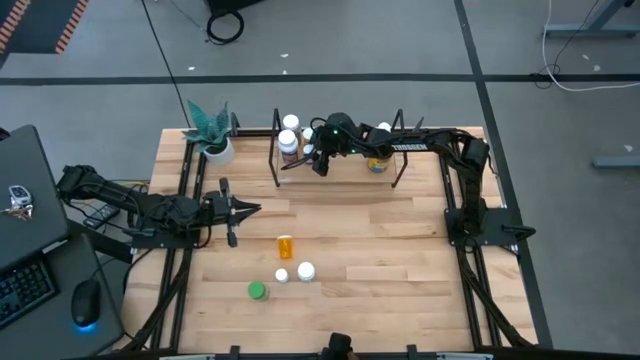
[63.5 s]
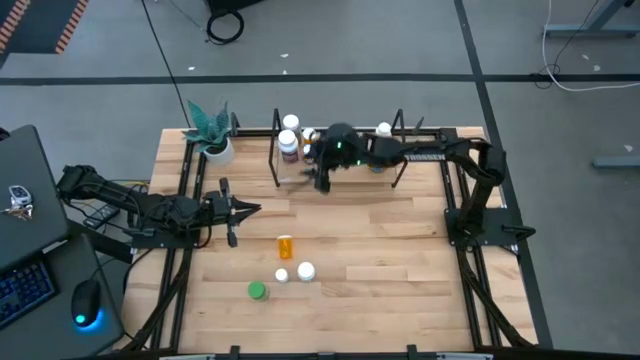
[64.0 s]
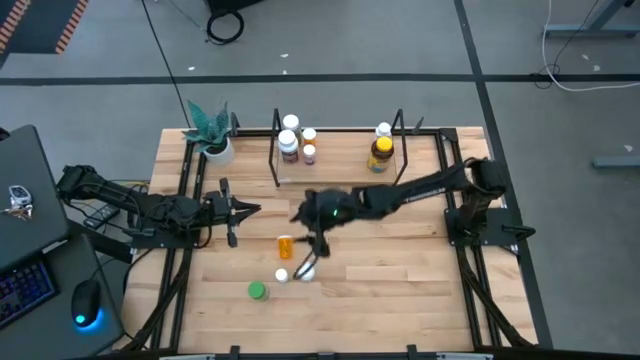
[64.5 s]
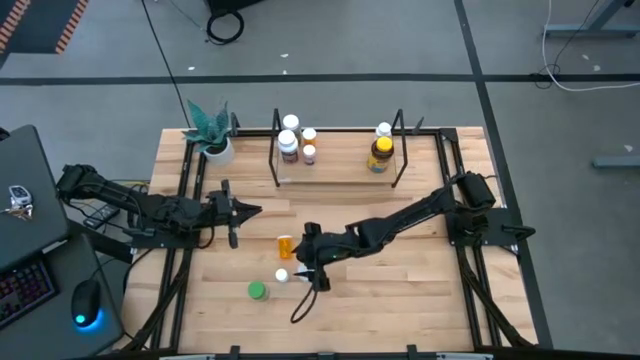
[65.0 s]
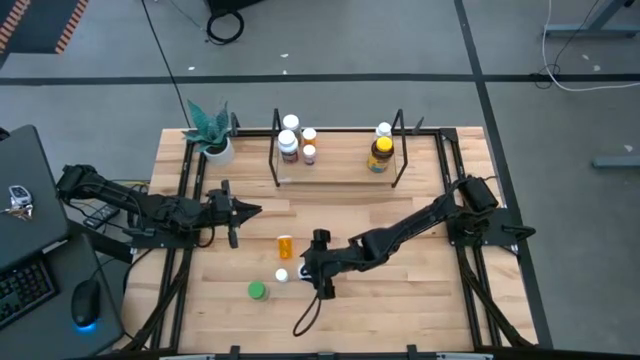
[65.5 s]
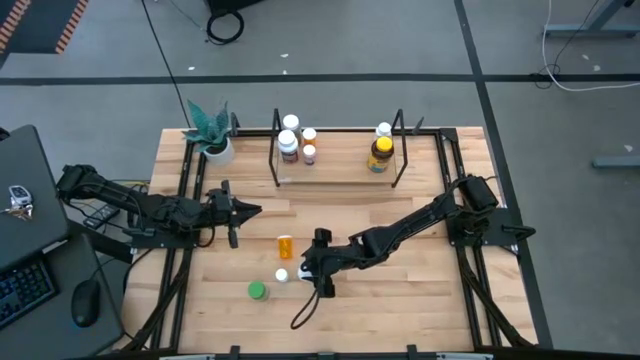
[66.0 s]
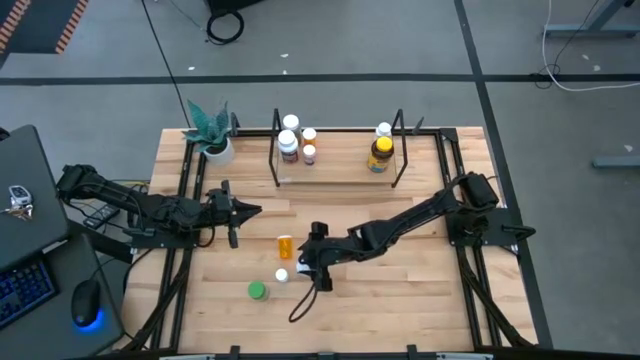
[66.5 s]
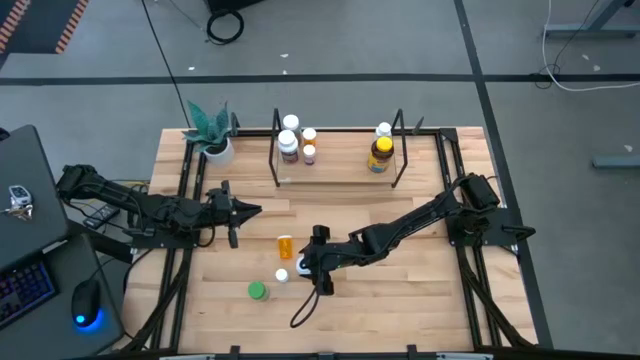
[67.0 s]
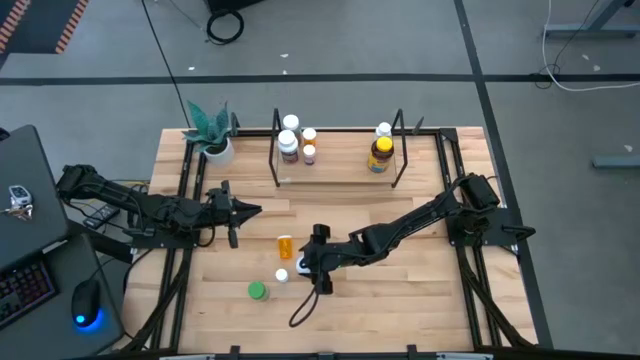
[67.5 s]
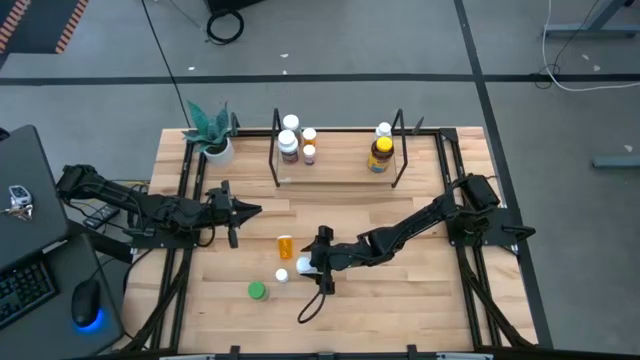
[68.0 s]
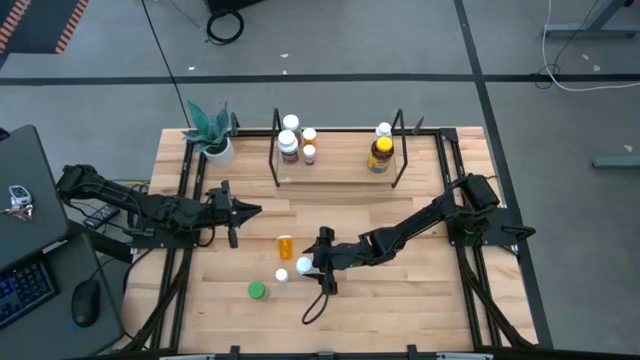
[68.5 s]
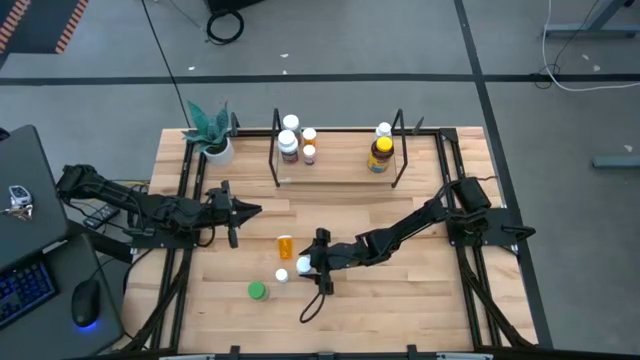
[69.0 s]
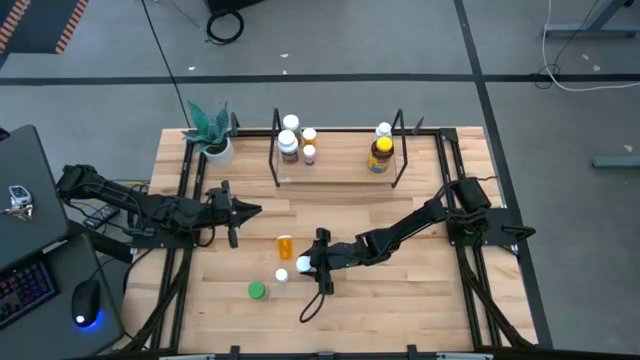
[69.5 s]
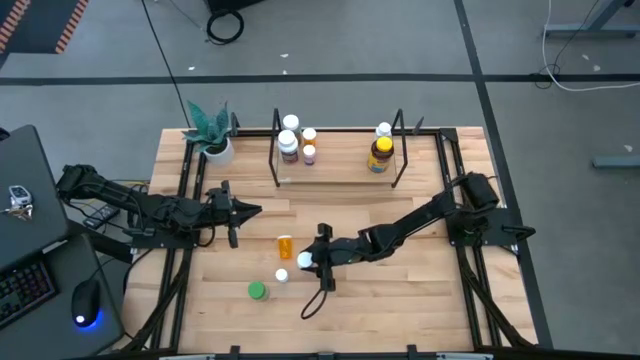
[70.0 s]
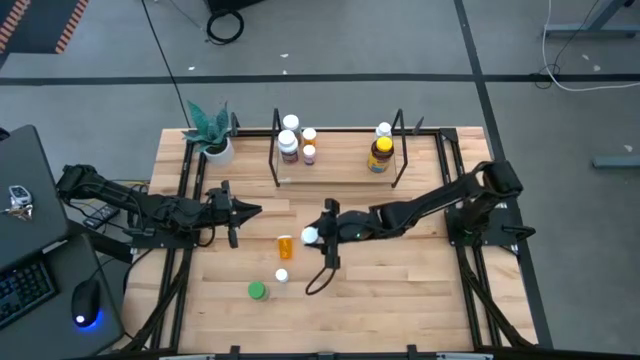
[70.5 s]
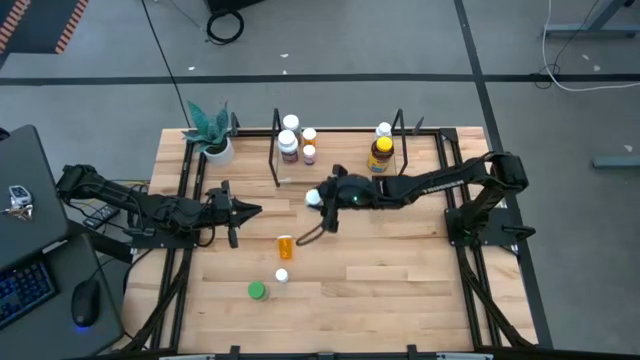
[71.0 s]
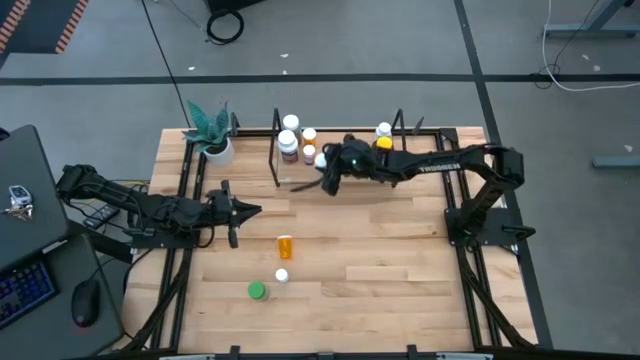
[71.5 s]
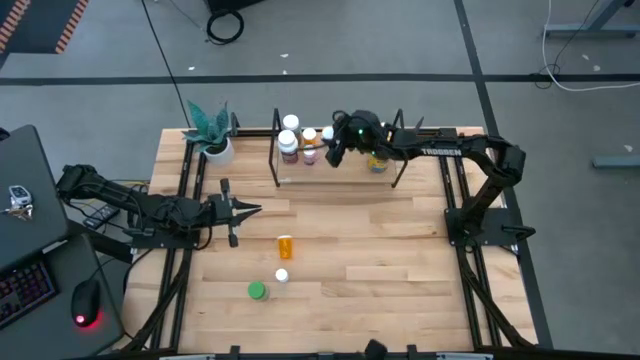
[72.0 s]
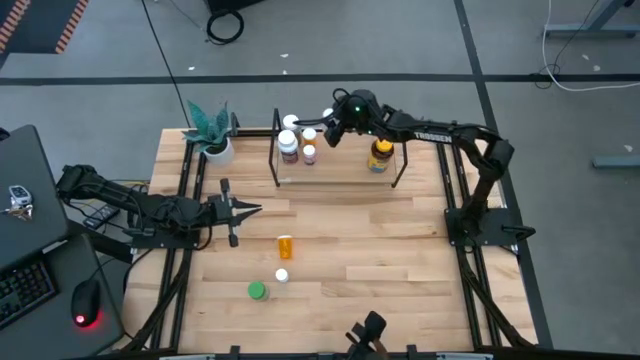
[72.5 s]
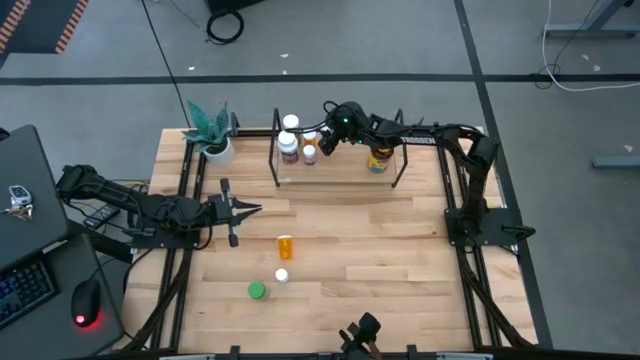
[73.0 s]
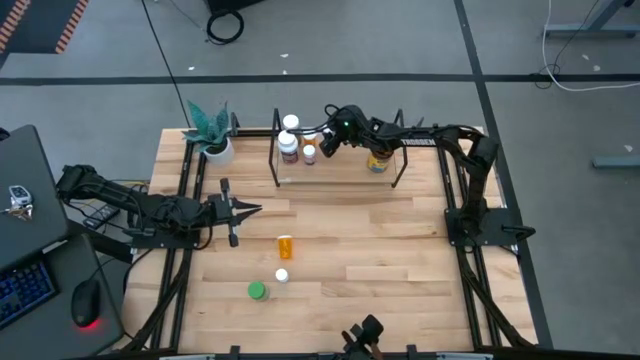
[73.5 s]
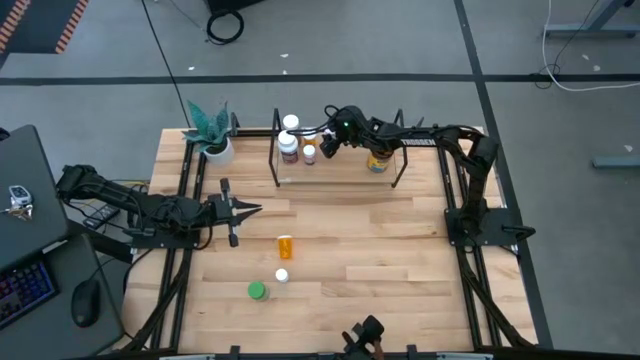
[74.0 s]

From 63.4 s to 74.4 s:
Task: Pick and place medicine bottles onto shelf by color
Put the right white pill bottle on the shelf

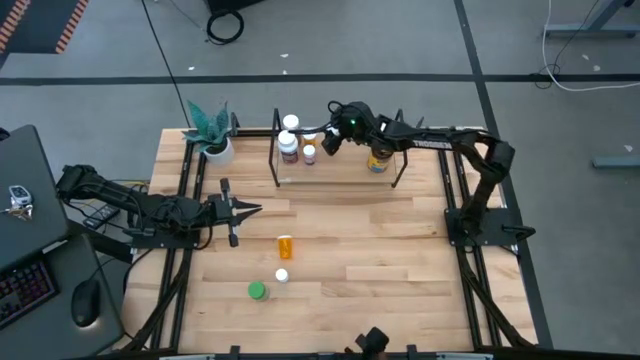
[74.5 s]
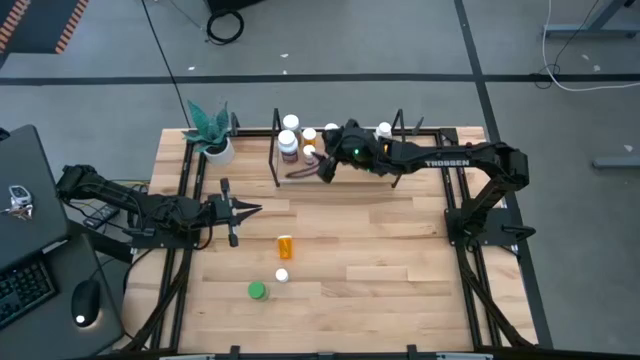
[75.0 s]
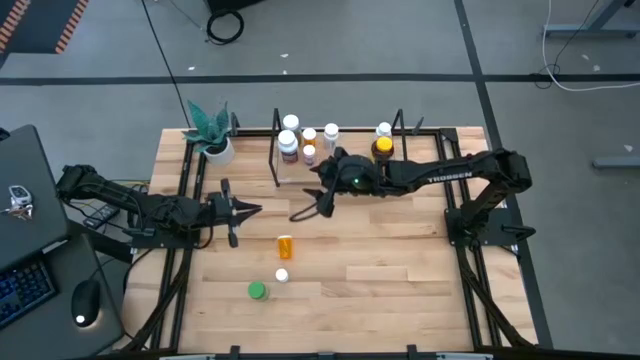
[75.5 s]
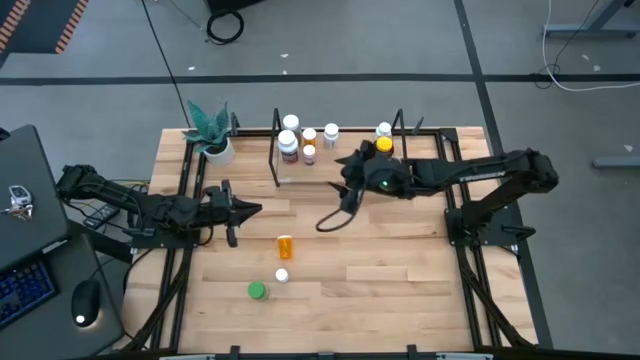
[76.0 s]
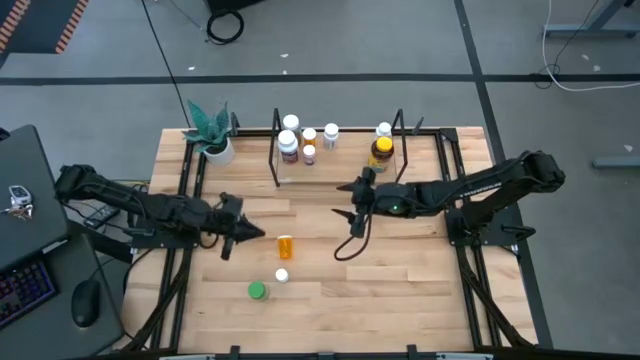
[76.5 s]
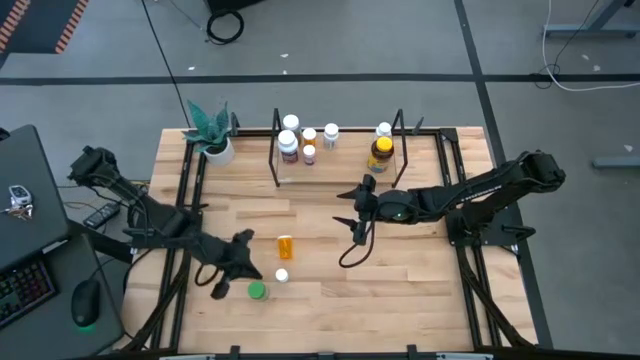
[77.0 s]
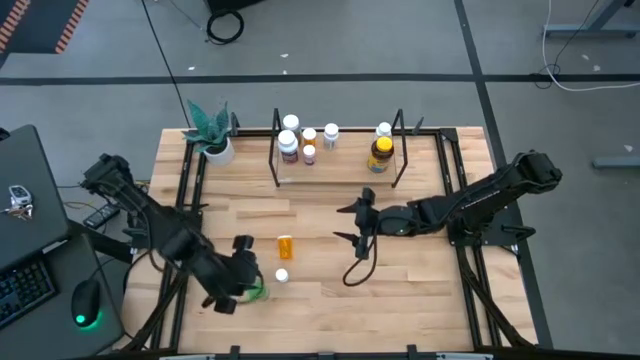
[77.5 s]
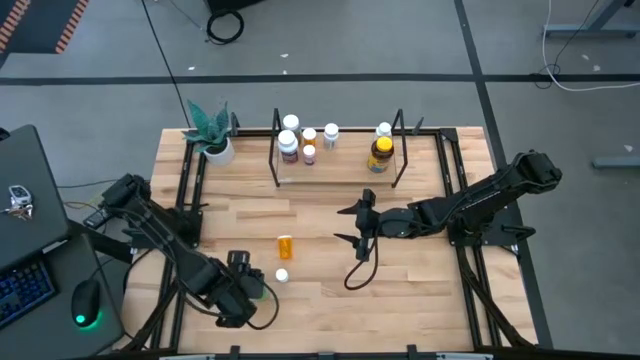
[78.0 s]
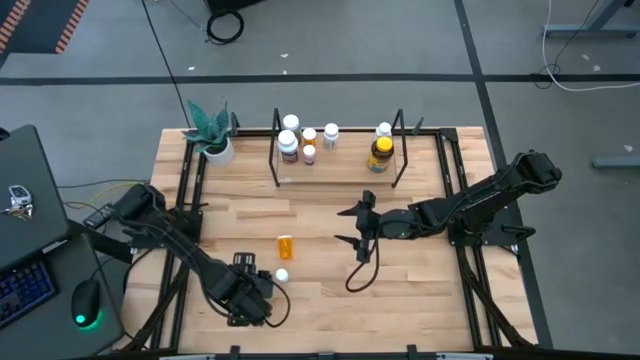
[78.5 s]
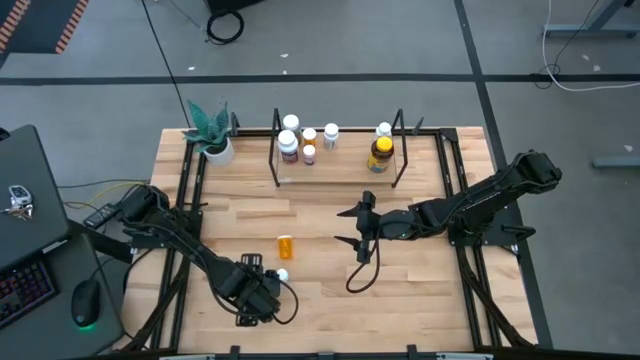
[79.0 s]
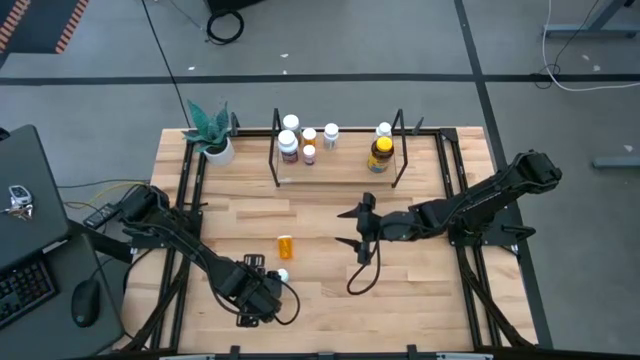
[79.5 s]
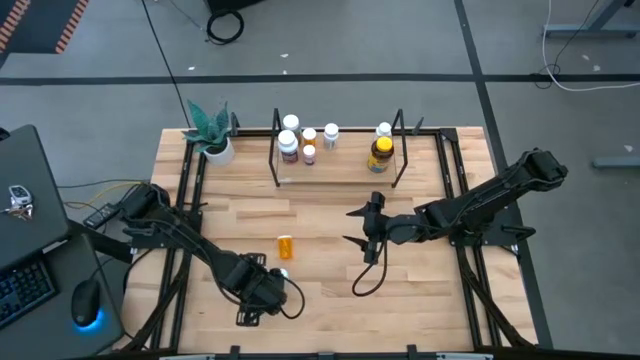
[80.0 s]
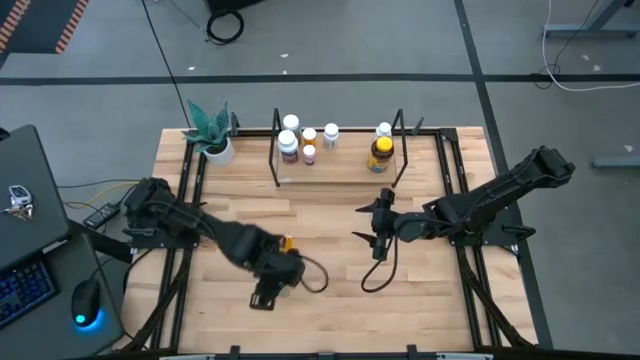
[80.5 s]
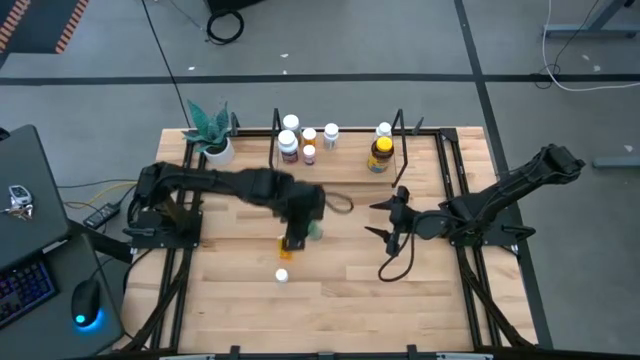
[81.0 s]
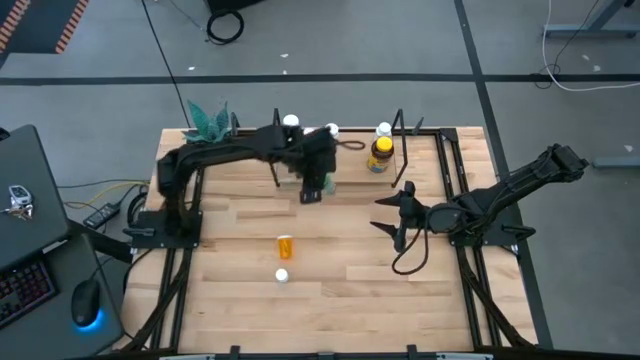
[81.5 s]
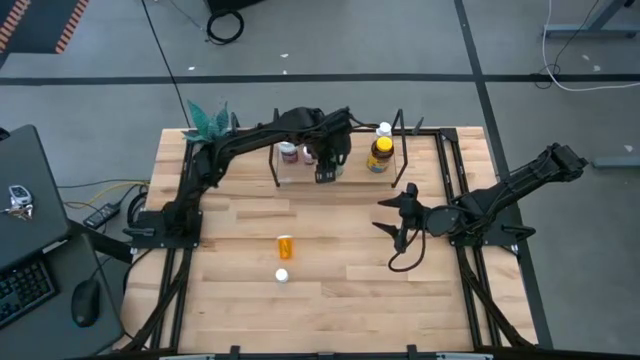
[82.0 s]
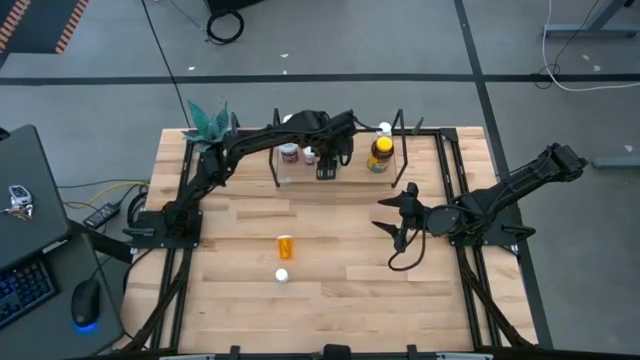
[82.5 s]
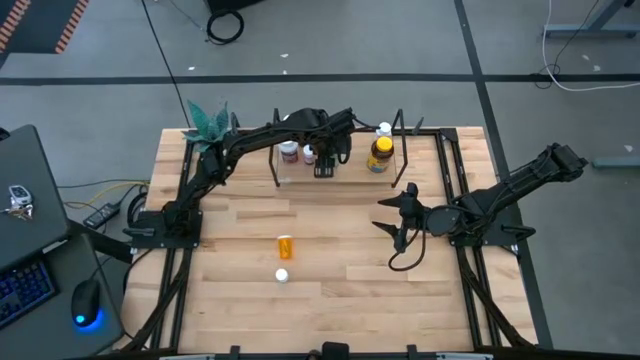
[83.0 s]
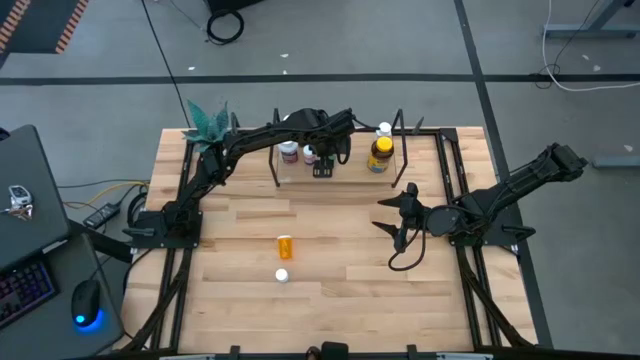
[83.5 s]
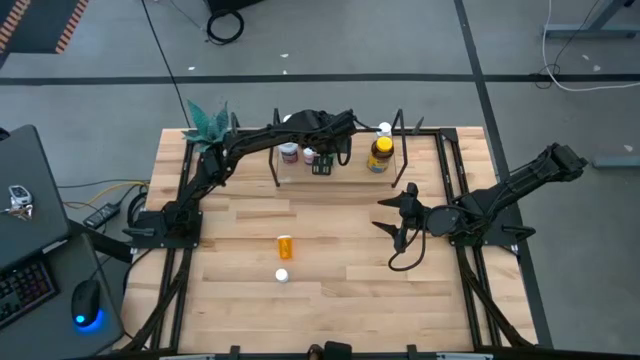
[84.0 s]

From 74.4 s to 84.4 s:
Put the green pill bottle on the shelf

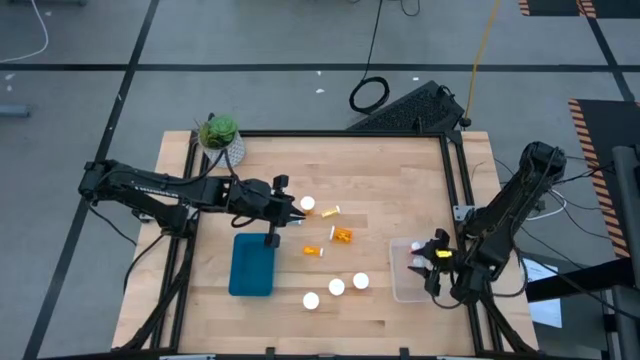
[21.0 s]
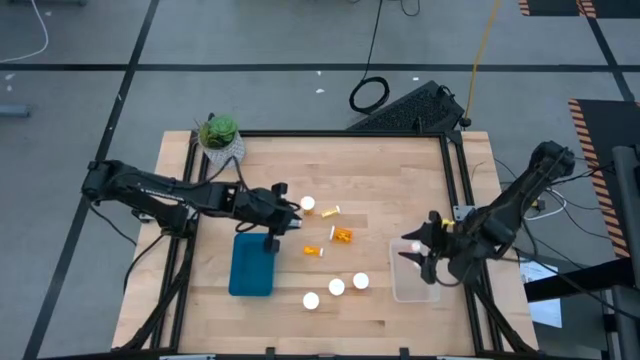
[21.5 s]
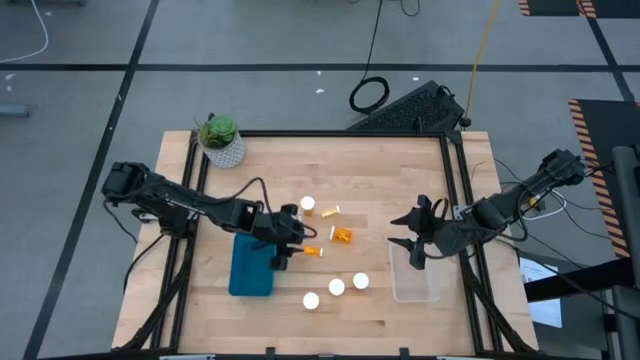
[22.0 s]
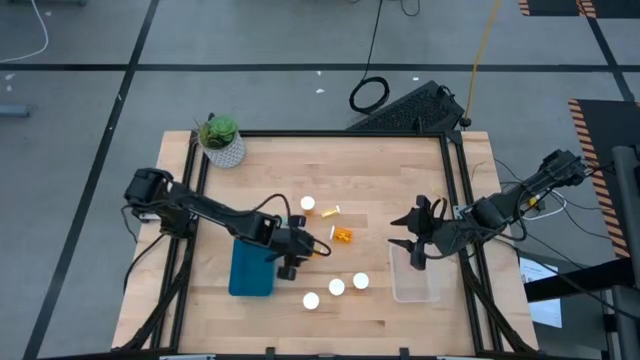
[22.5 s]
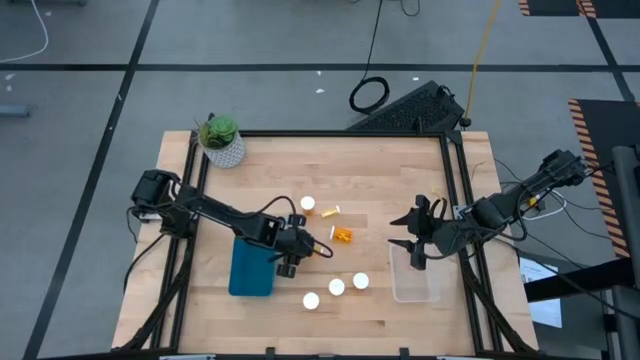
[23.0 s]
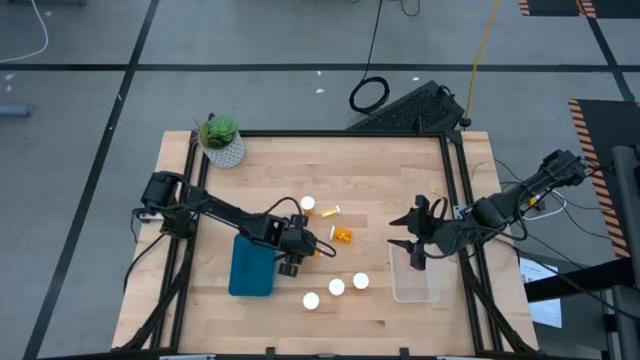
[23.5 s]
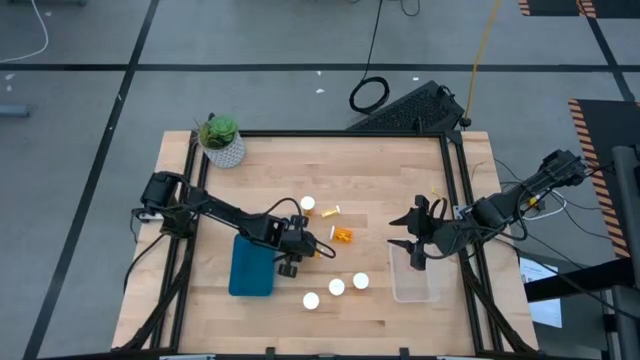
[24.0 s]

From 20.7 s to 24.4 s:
Task: Pick and place medicine bottles into bin by pill shape (circle, oval)
Put the orange bottled tablet into the transparent bin
